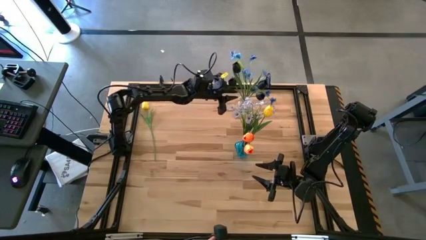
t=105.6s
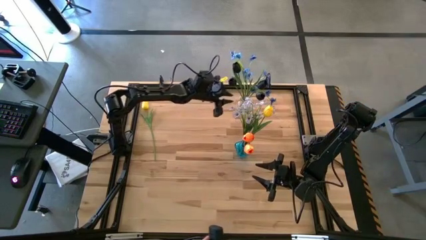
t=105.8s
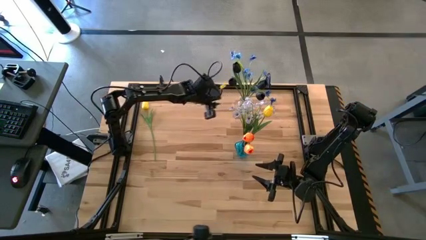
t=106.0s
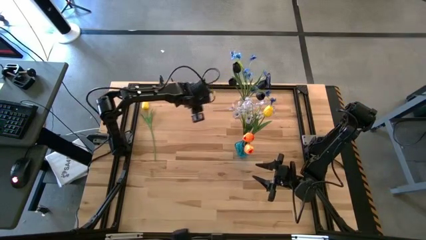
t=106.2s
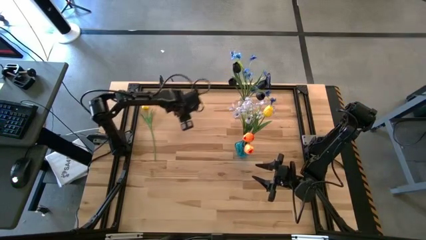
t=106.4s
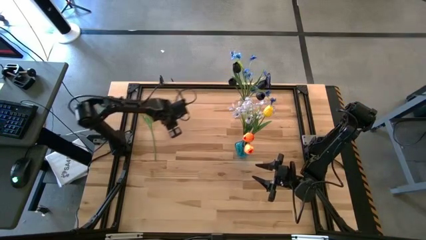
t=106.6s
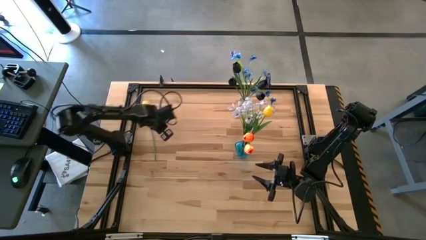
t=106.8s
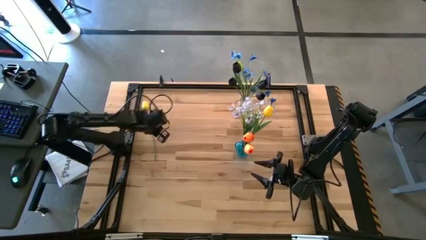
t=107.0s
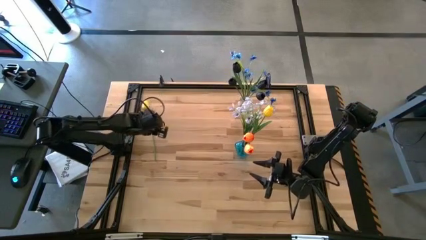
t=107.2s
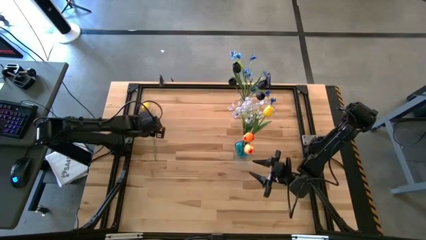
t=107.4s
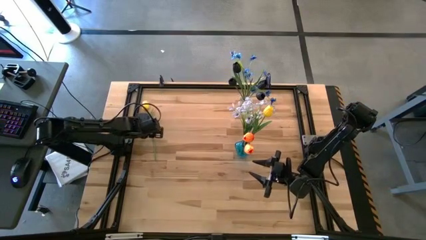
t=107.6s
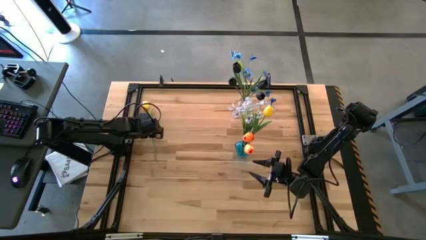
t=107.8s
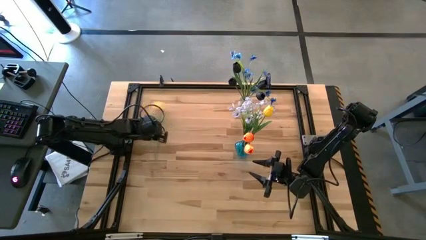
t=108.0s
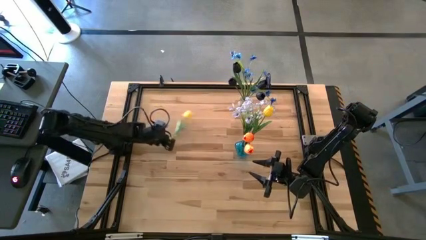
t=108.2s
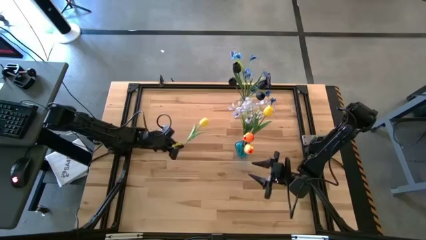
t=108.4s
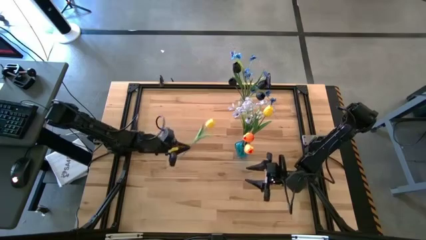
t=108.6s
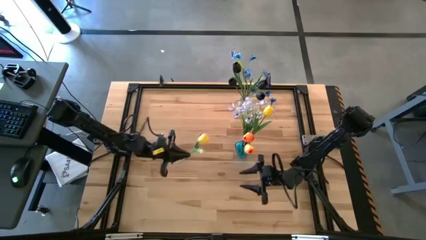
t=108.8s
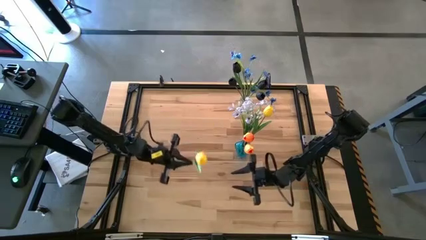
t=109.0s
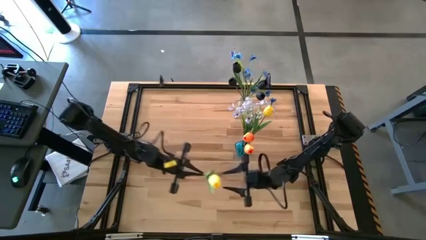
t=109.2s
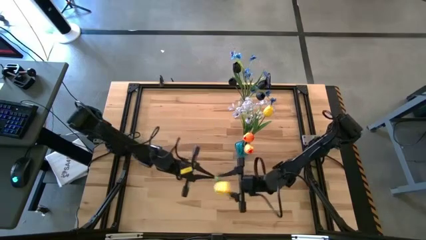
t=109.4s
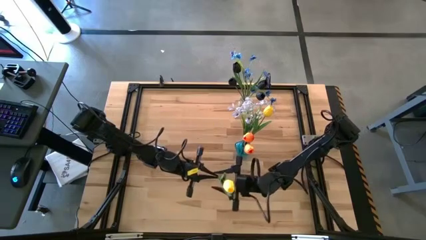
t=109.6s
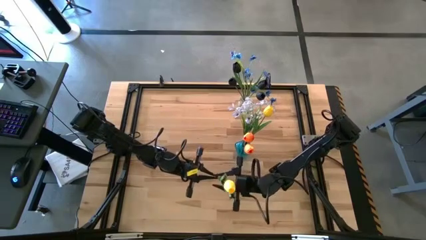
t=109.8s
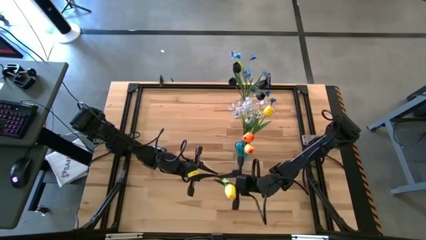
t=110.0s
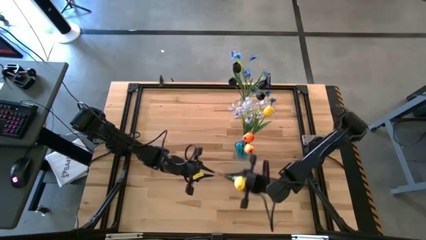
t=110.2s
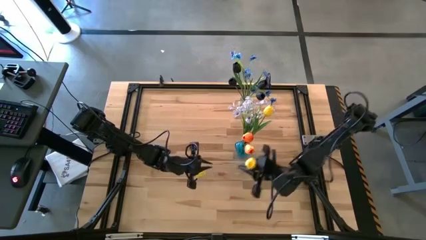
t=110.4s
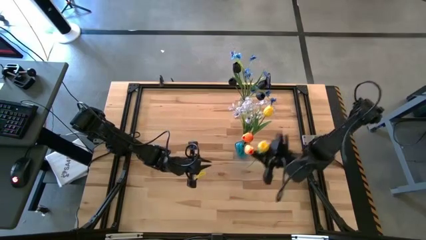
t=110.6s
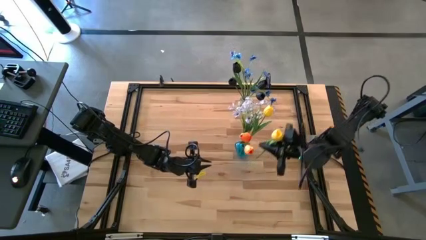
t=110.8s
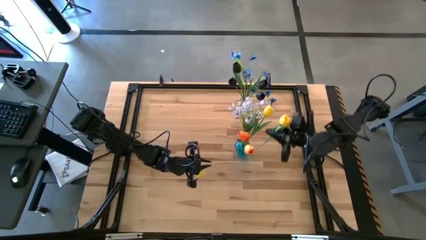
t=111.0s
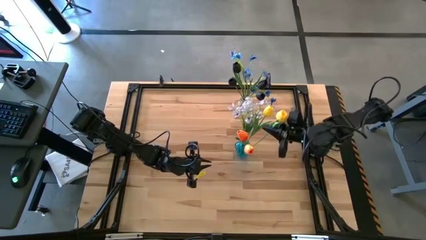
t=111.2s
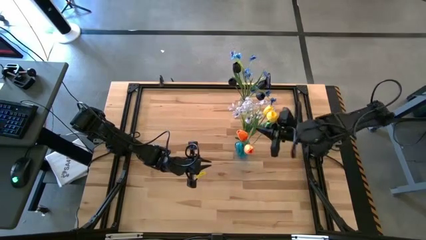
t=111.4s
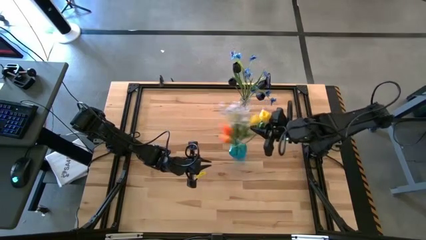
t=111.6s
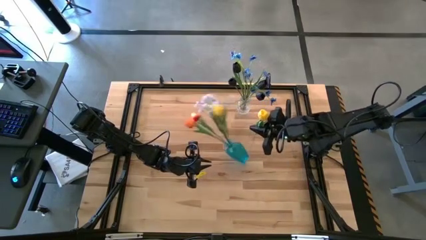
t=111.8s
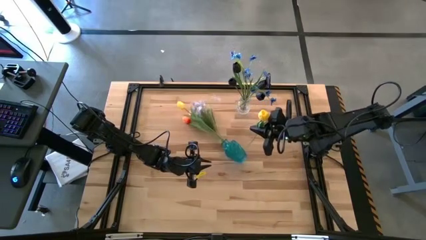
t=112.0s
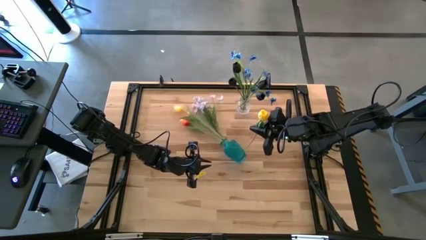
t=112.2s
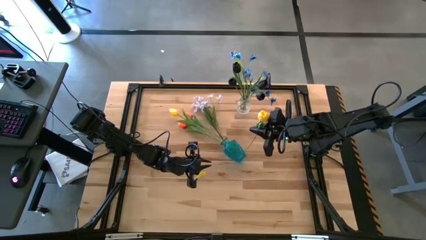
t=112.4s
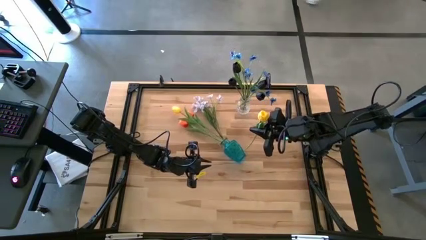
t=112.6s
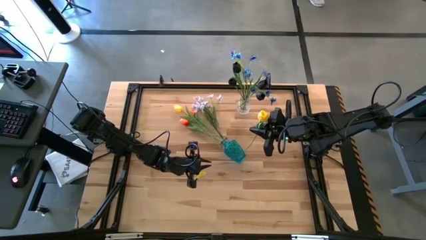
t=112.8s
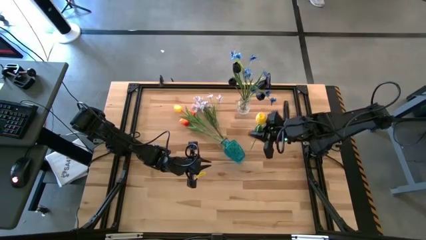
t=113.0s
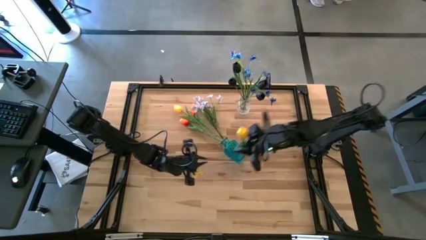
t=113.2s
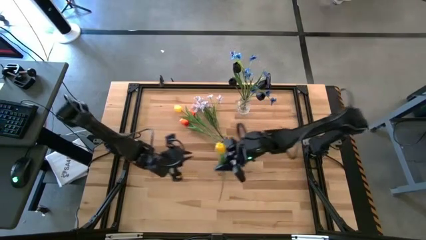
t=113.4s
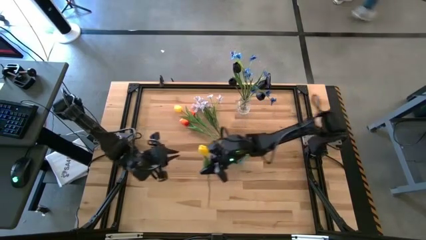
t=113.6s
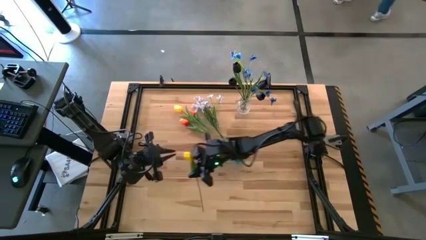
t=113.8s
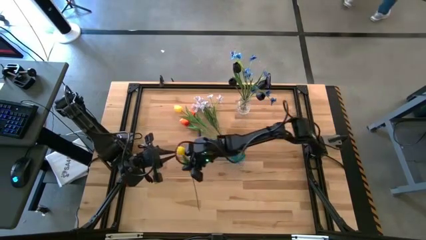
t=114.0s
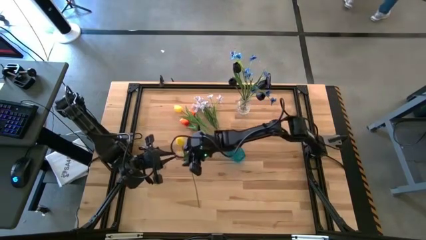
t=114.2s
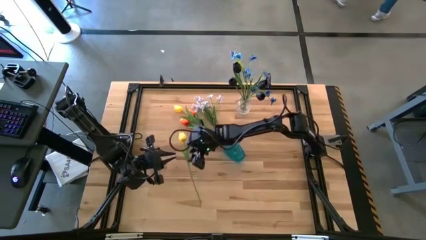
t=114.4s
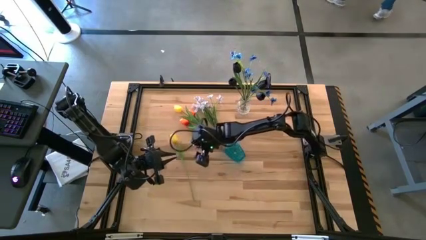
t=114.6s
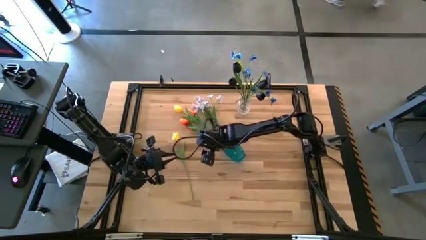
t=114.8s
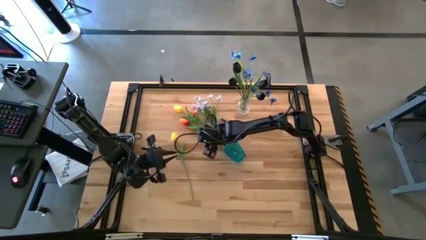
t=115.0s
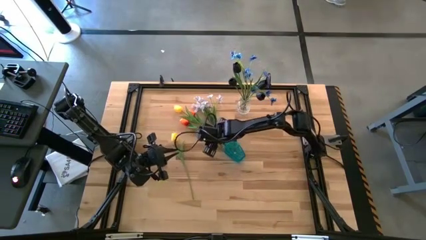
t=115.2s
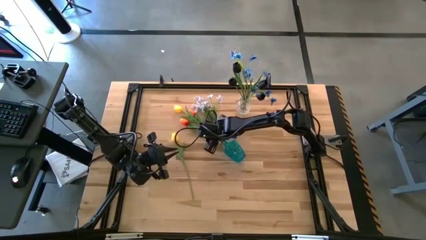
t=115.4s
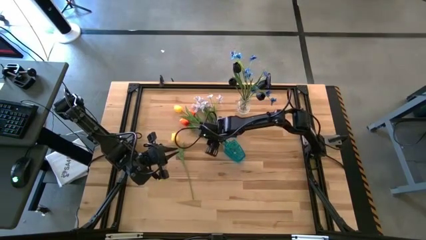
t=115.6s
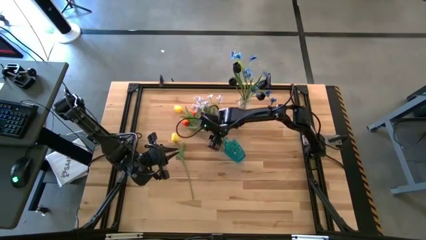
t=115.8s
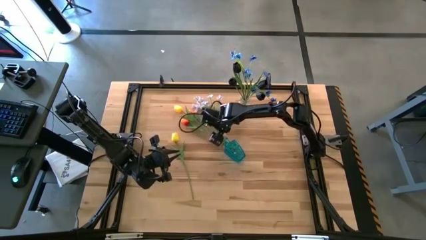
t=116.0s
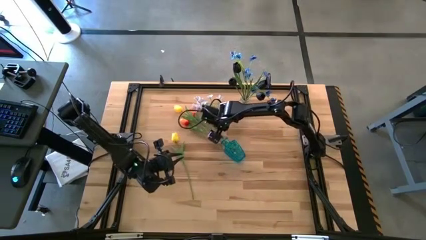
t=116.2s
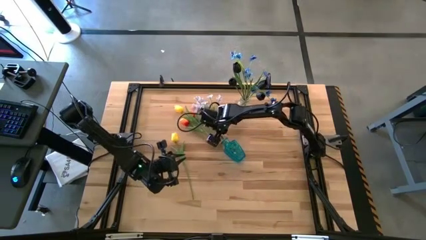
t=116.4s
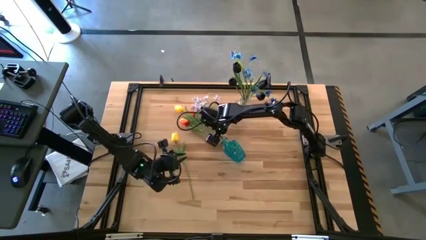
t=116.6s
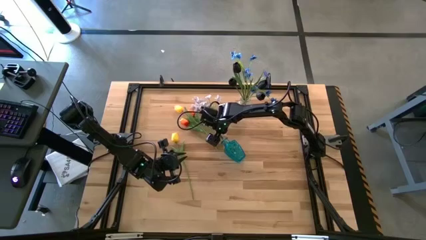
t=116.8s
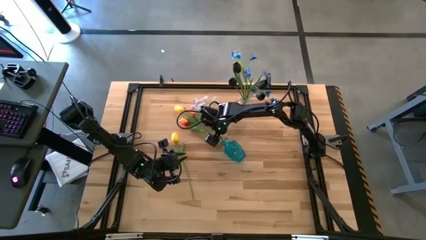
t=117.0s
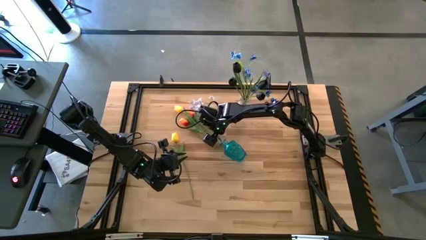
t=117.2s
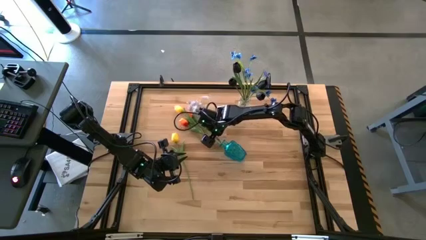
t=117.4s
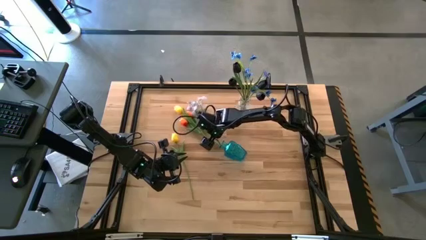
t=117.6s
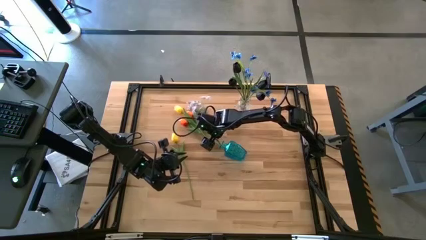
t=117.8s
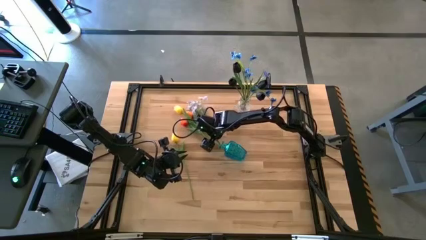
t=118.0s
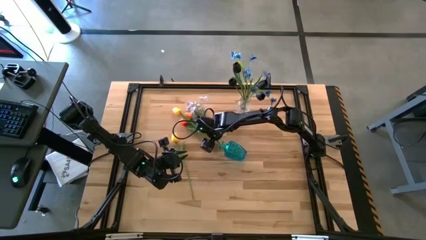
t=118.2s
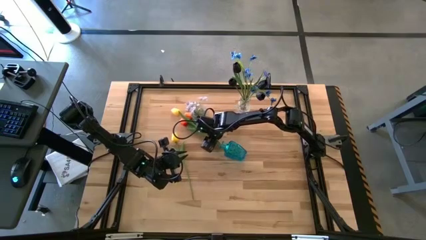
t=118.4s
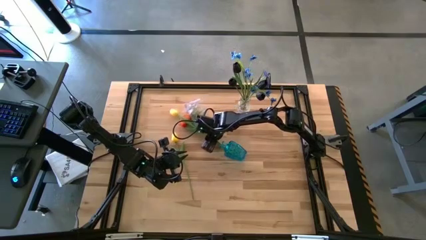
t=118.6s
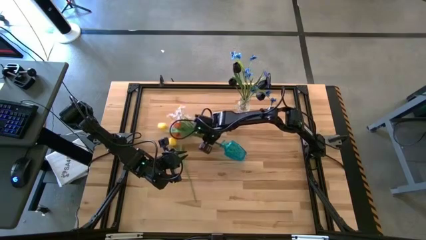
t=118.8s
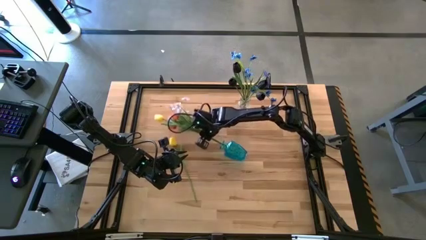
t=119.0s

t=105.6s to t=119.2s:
Task: Sort flowers into vase by color
Put the yellow tulip into the blue flower vase
